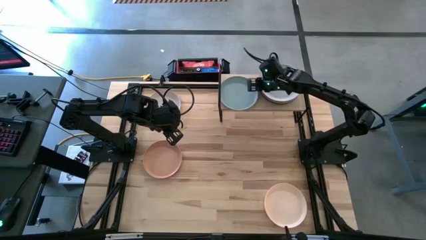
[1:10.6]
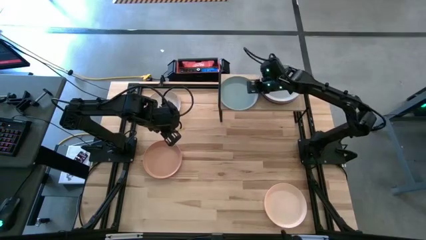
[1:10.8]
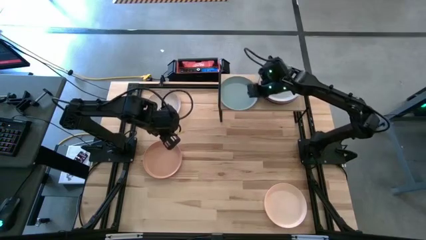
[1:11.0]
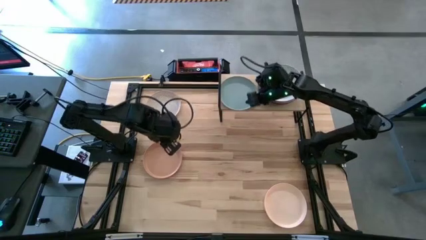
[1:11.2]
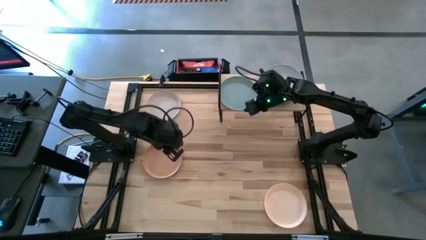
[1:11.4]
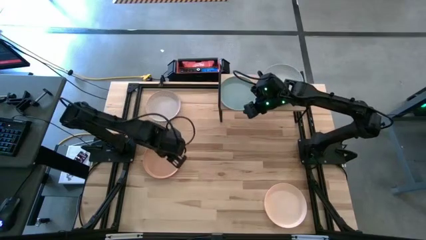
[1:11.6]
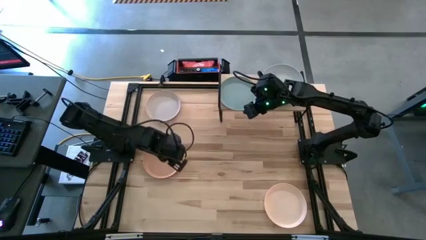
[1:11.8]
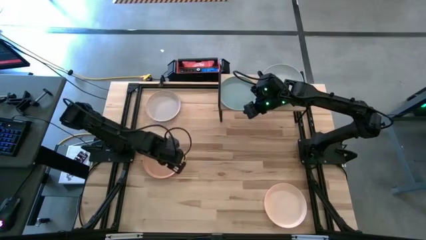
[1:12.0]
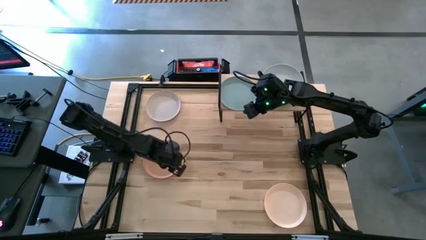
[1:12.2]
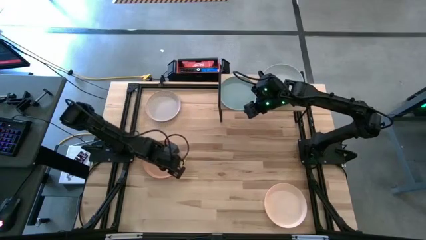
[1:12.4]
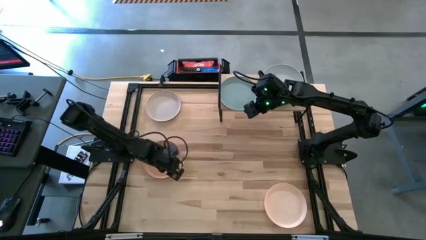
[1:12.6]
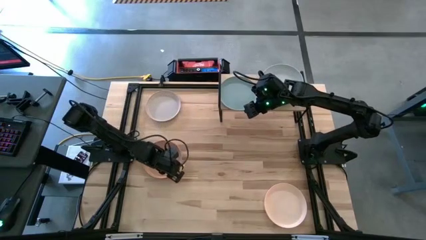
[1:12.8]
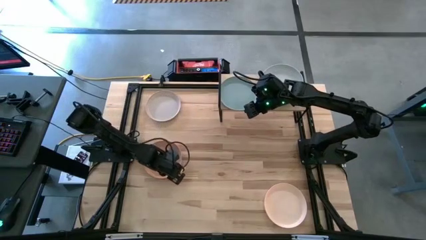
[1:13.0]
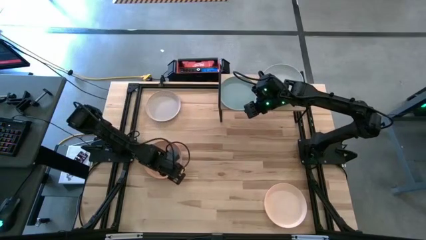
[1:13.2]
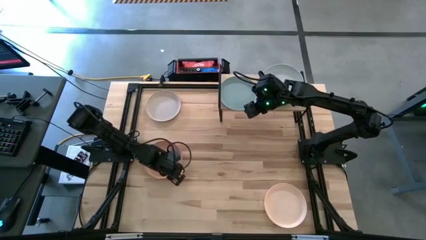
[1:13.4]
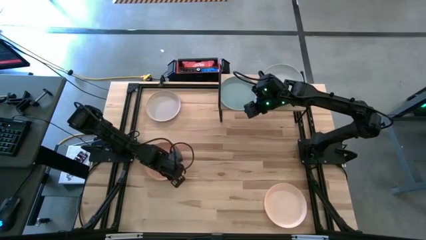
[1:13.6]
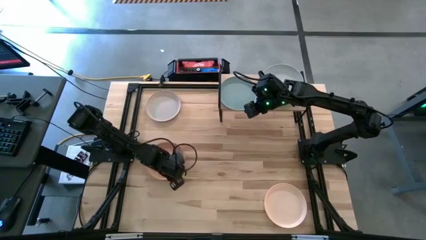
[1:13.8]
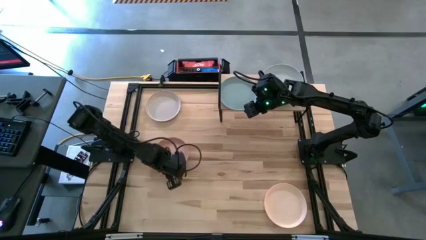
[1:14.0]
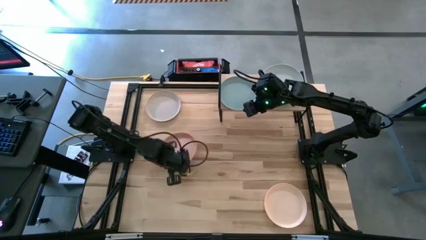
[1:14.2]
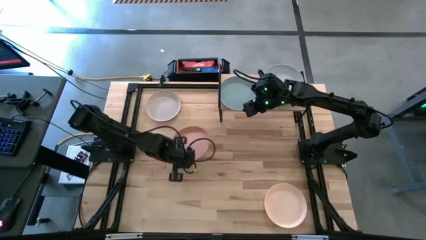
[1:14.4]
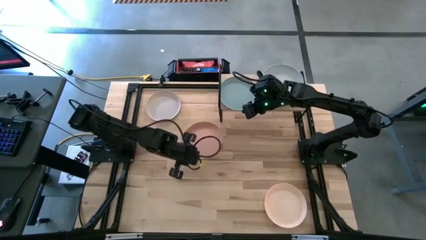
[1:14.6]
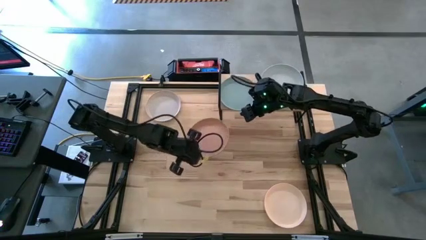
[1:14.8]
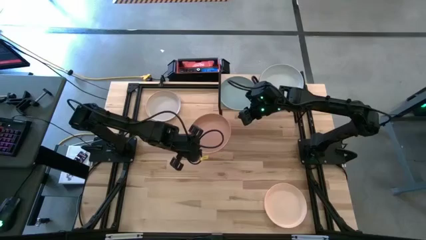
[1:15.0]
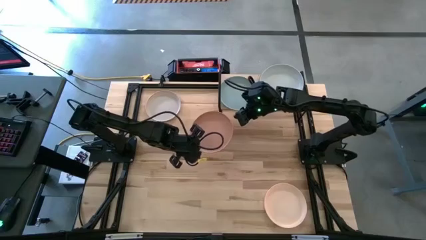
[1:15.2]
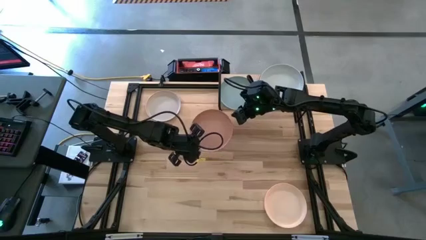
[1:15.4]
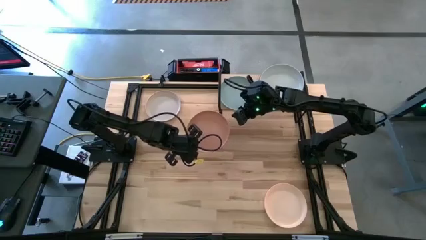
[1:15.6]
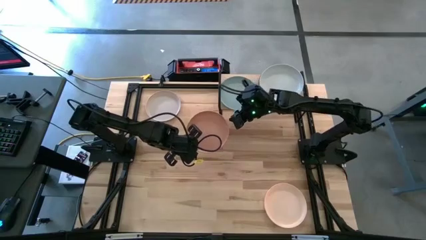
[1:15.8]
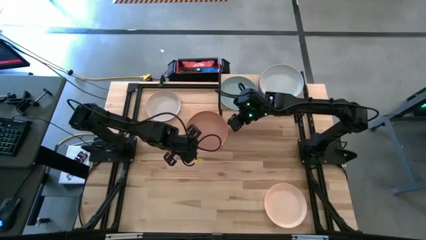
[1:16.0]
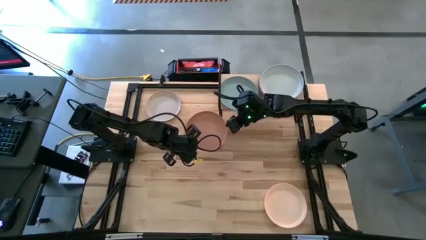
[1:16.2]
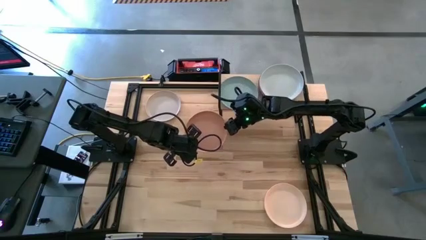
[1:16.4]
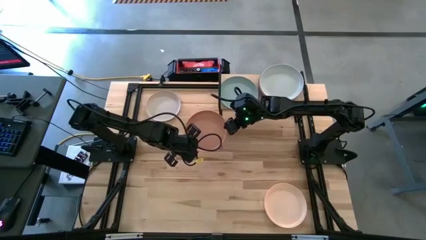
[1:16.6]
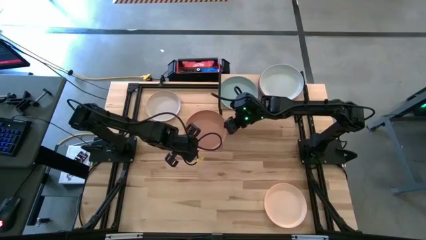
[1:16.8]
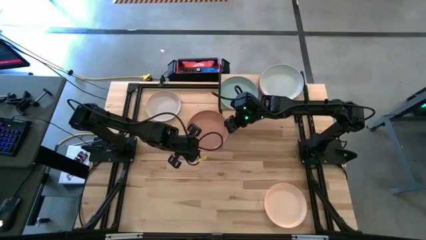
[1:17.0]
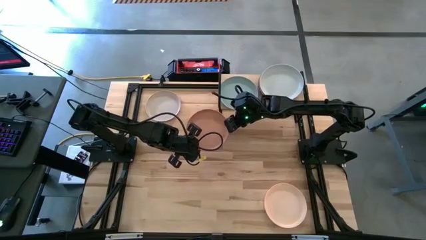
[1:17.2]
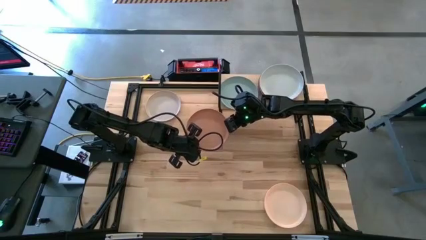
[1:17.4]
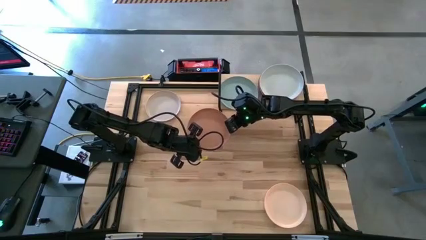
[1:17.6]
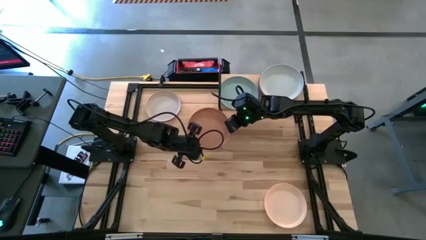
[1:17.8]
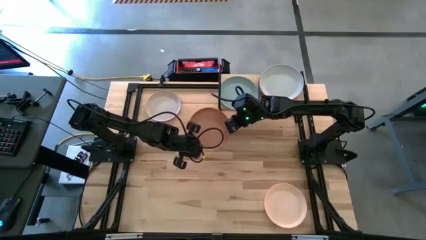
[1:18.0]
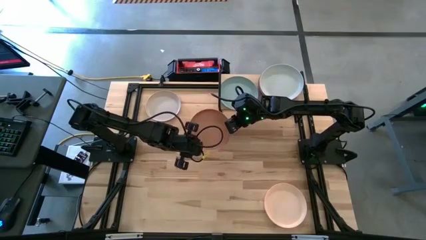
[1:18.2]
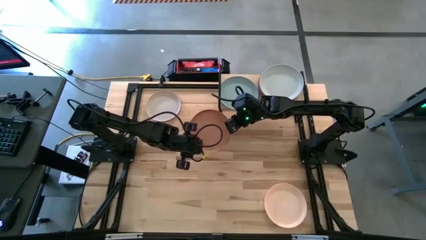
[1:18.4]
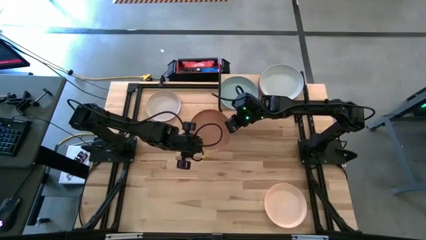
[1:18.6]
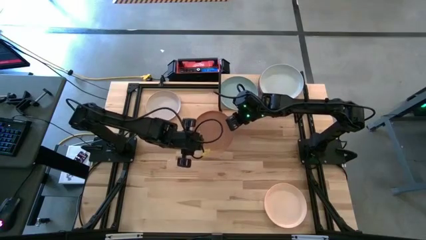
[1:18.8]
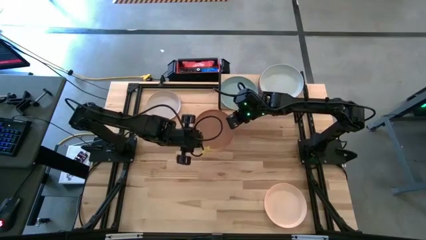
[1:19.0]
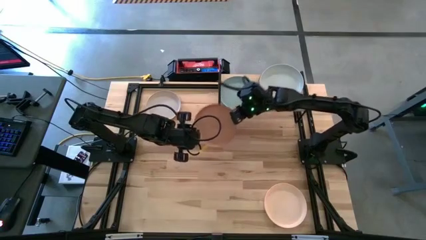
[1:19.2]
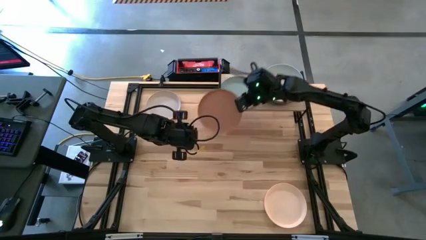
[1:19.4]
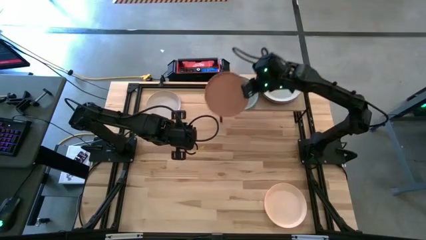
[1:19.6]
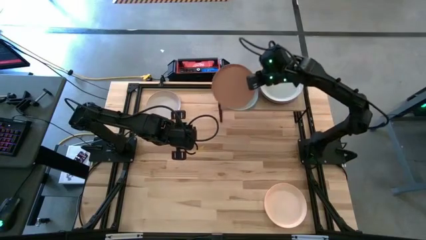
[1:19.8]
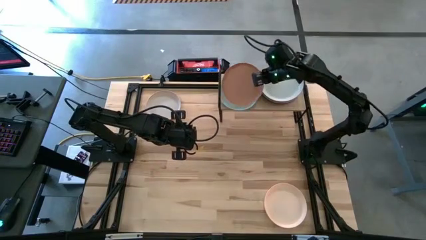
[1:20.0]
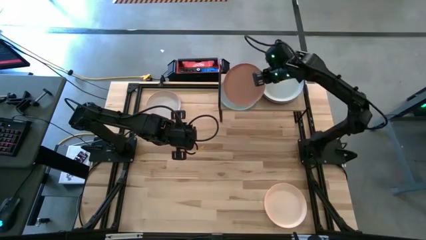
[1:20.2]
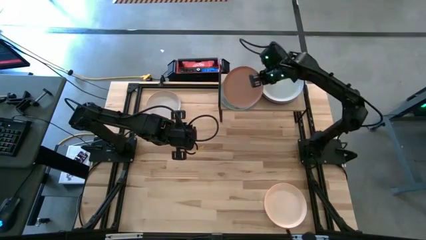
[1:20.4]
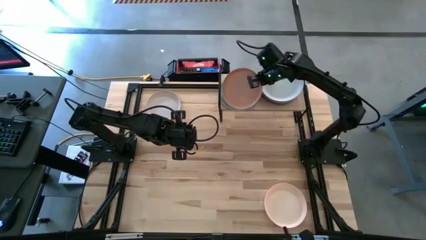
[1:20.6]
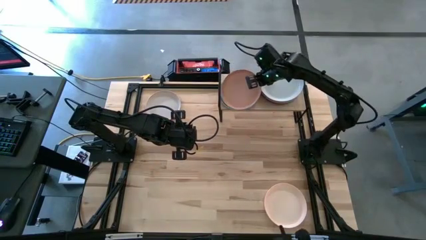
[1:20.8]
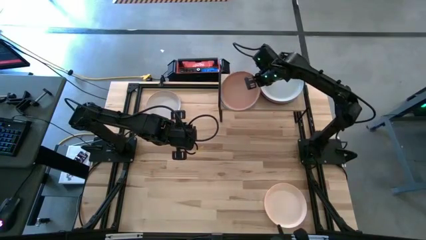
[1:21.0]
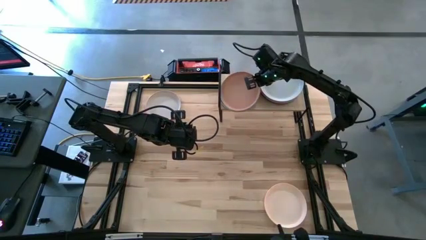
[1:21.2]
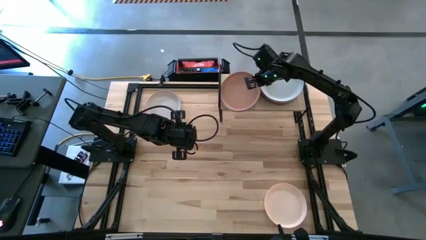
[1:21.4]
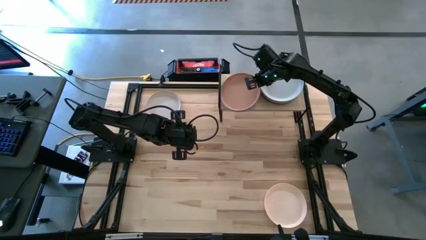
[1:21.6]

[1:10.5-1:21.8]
Task: Place and stack plates onto a shelf
Stack the brown plate on top of the light blue plate on the shelf

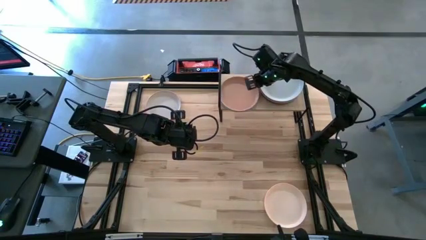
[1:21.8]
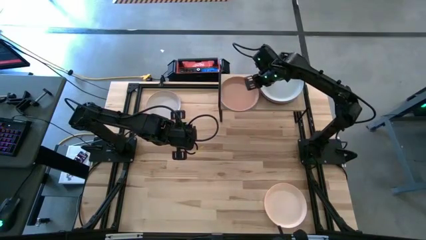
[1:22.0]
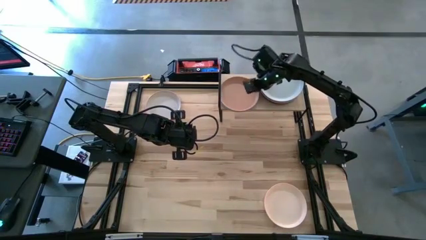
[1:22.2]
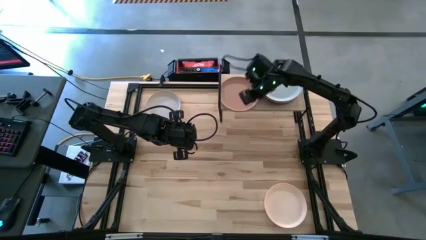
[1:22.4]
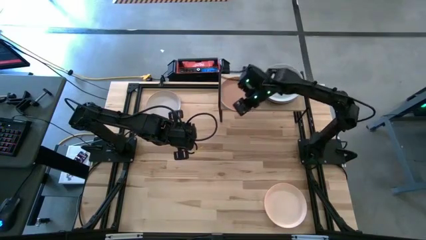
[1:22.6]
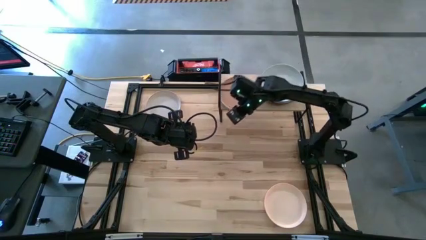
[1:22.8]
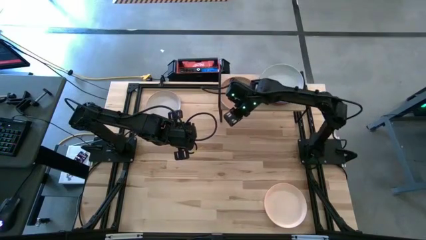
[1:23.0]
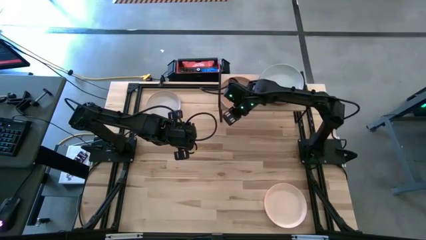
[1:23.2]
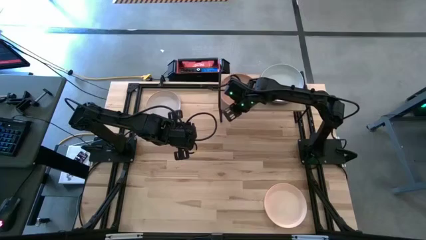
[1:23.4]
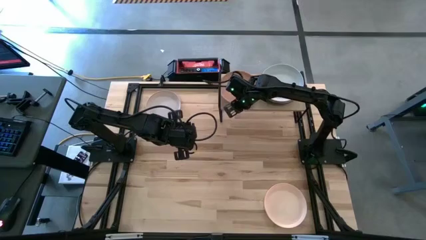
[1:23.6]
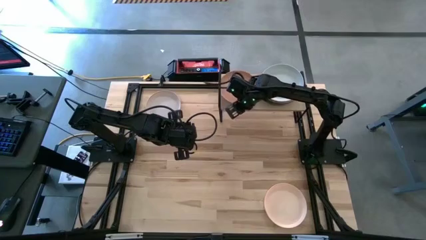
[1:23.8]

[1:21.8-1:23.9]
Adjust the left stacked plates on the shelf

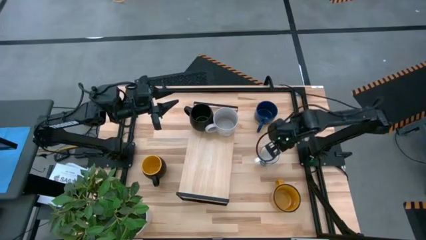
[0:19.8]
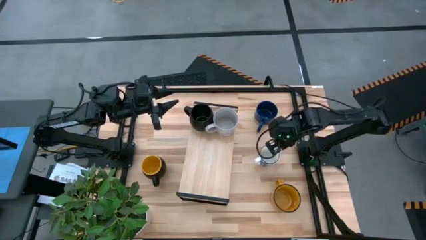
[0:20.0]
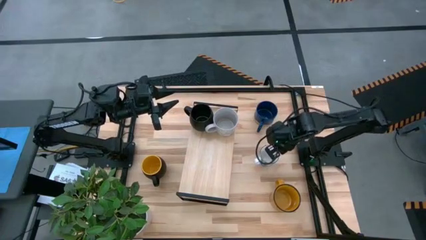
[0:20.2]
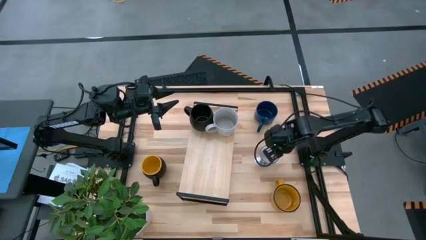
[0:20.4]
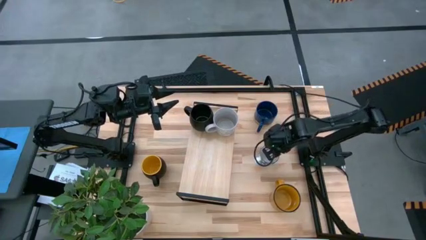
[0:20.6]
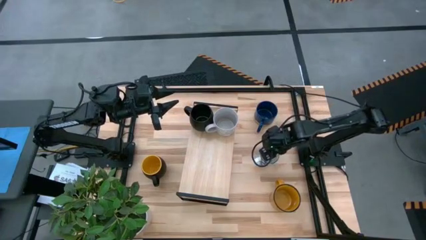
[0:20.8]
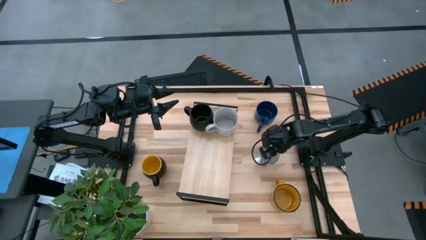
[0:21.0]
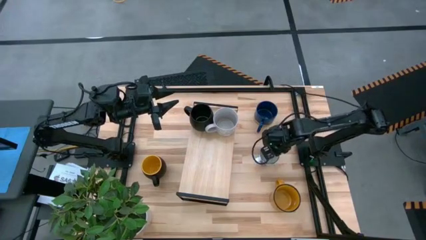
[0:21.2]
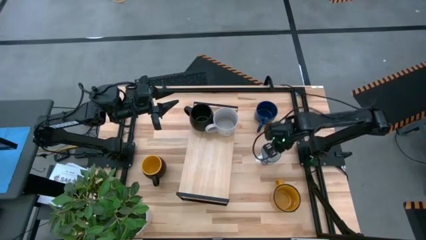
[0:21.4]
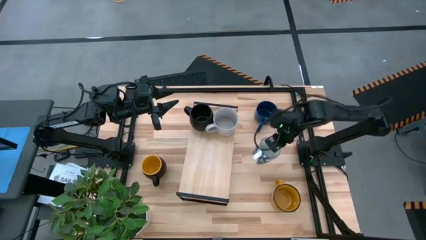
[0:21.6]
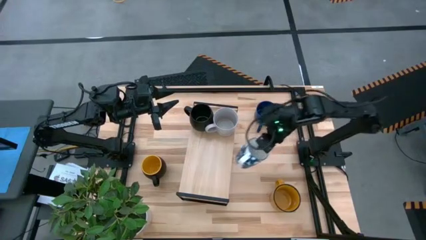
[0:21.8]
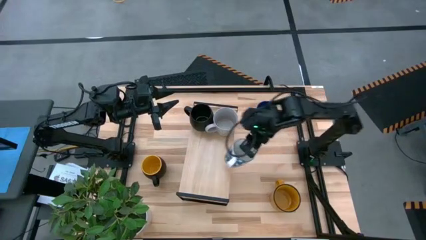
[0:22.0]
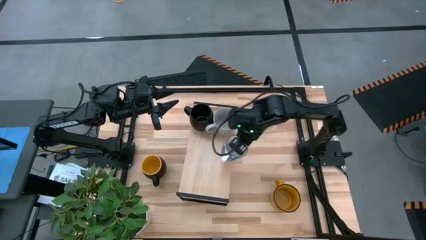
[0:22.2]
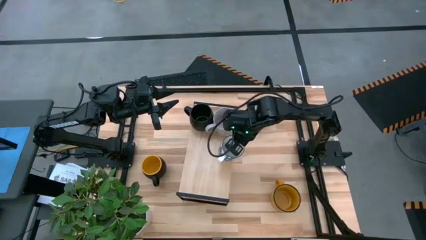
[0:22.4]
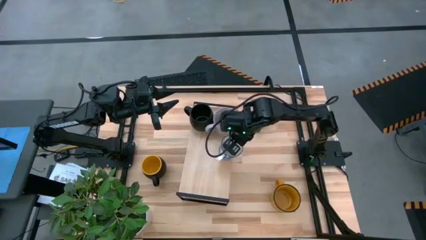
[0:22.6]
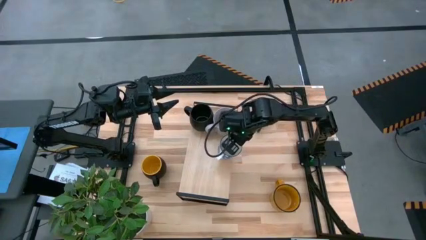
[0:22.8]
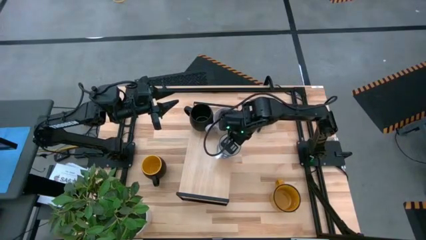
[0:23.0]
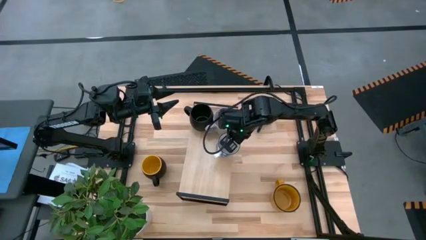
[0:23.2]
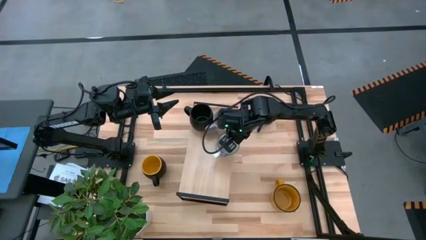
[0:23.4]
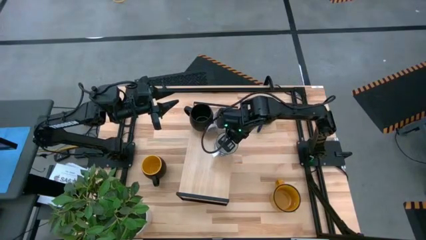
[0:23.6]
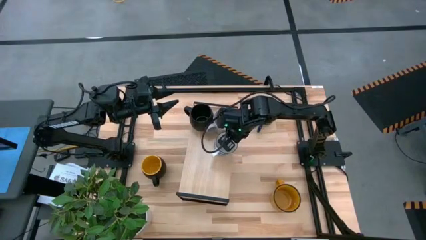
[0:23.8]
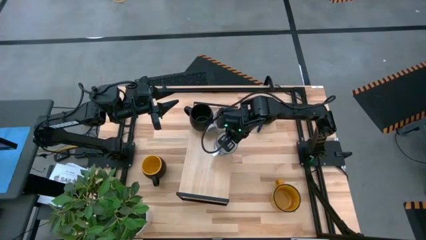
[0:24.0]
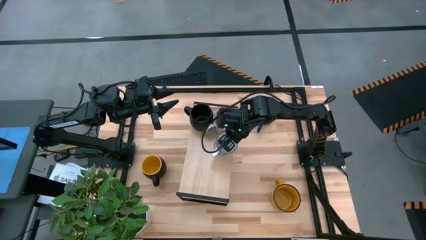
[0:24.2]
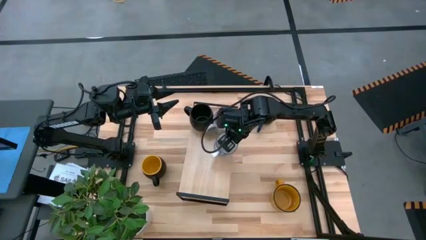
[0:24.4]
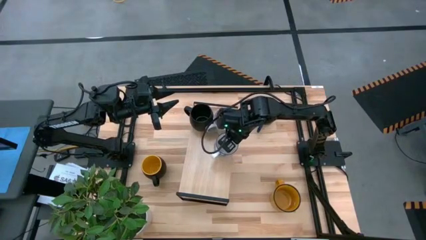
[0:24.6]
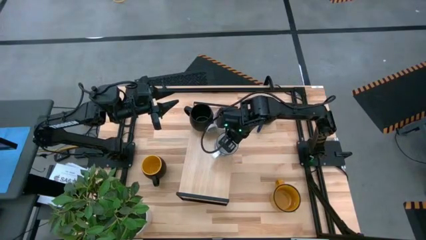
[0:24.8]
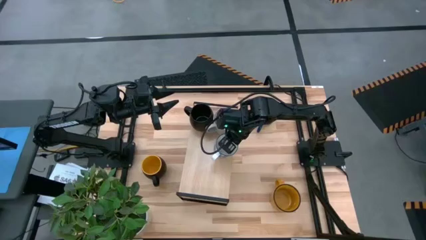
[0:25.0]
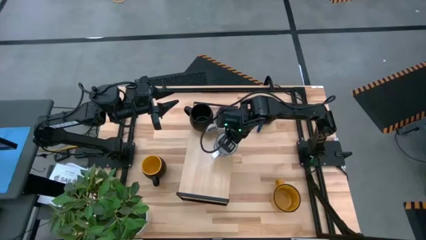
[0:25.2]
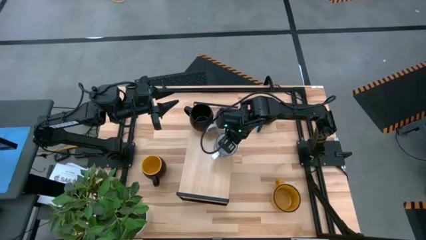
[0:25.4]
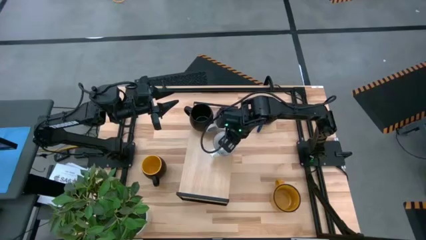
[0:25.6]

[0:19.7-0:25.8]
Task: Place coffee mugs
Put the blue patterned mug on the shelf
